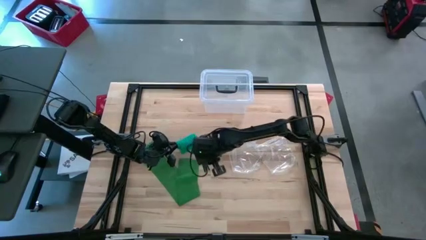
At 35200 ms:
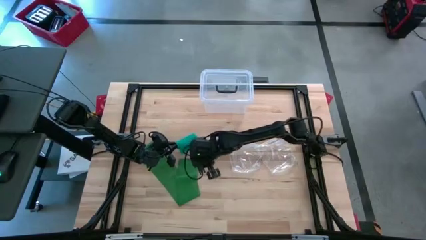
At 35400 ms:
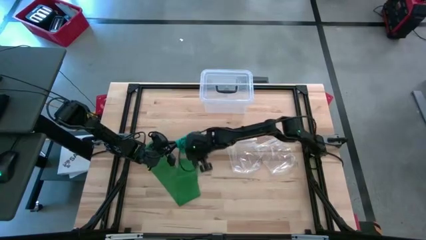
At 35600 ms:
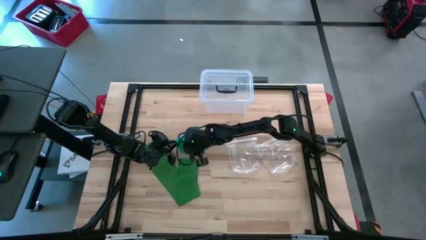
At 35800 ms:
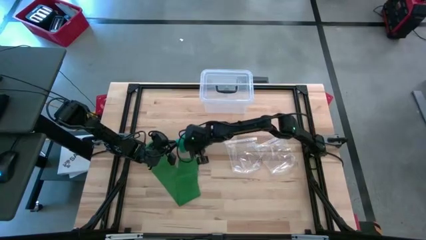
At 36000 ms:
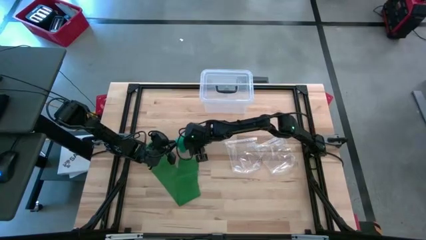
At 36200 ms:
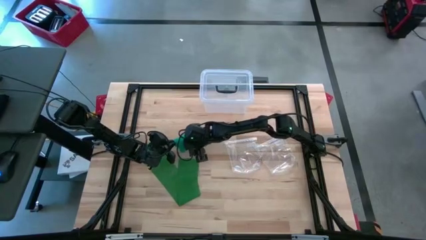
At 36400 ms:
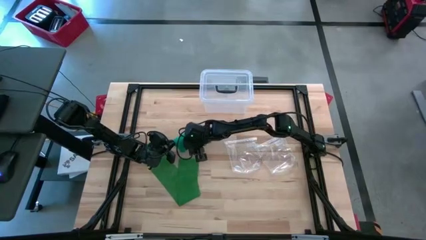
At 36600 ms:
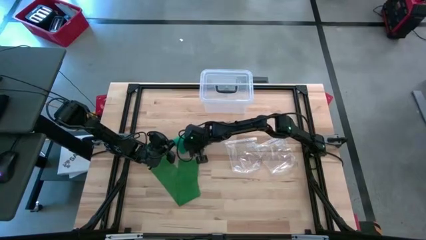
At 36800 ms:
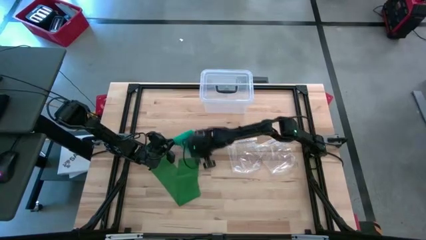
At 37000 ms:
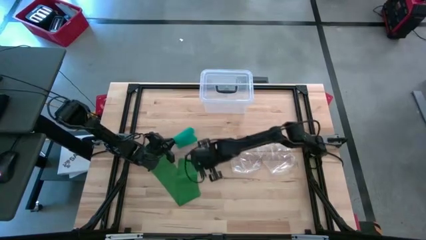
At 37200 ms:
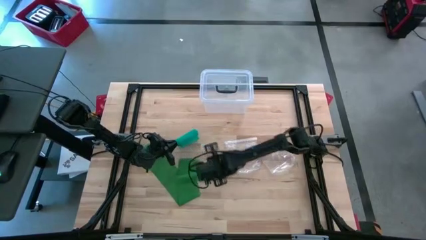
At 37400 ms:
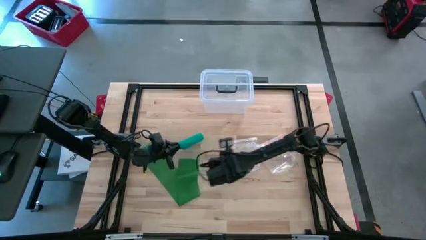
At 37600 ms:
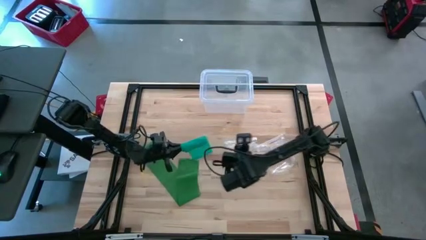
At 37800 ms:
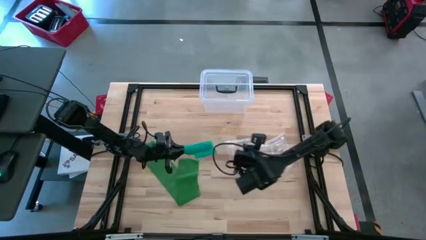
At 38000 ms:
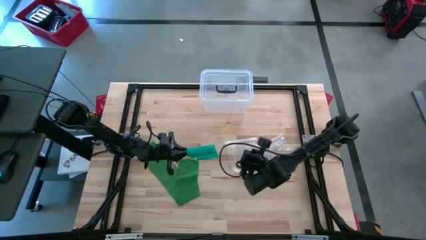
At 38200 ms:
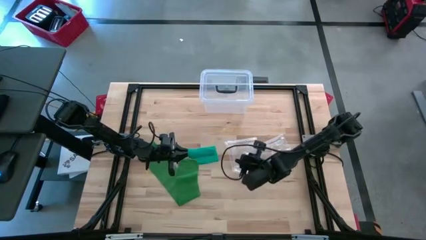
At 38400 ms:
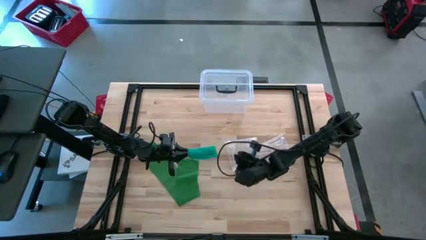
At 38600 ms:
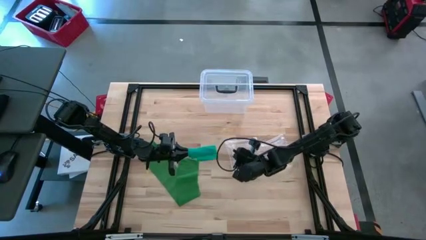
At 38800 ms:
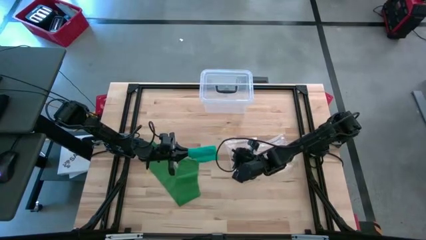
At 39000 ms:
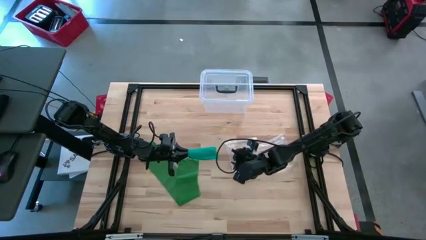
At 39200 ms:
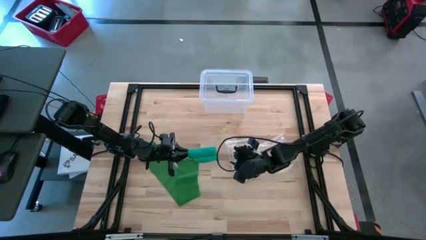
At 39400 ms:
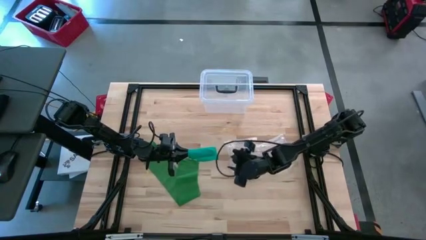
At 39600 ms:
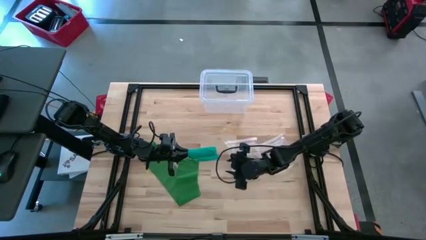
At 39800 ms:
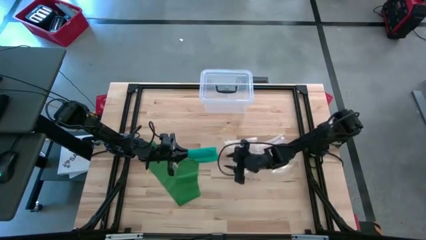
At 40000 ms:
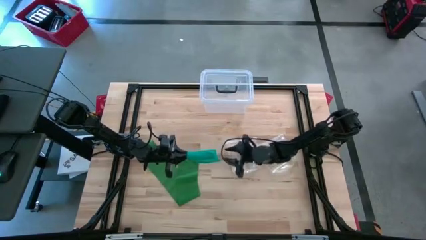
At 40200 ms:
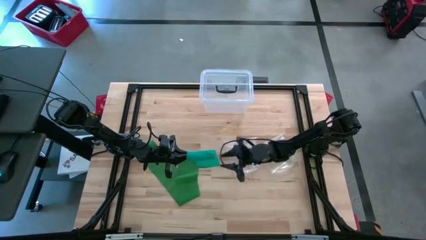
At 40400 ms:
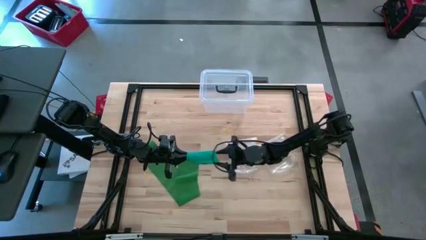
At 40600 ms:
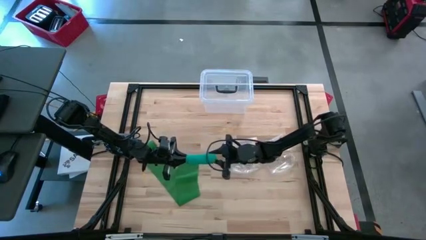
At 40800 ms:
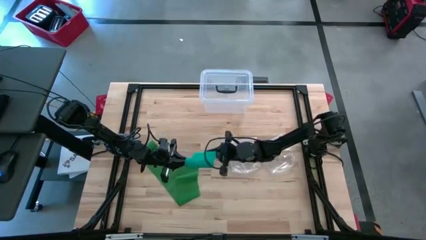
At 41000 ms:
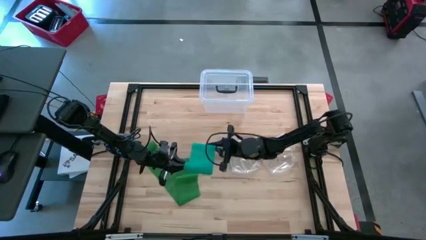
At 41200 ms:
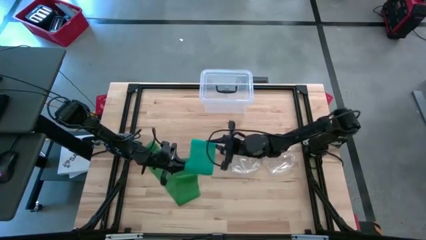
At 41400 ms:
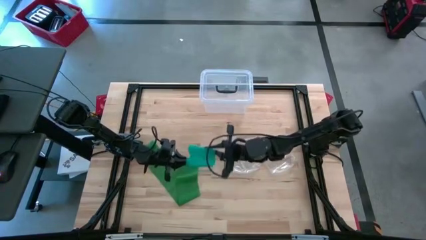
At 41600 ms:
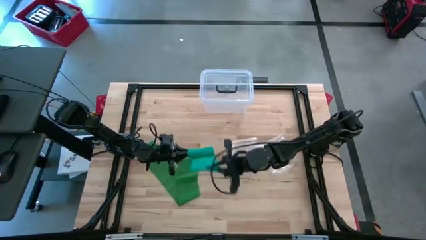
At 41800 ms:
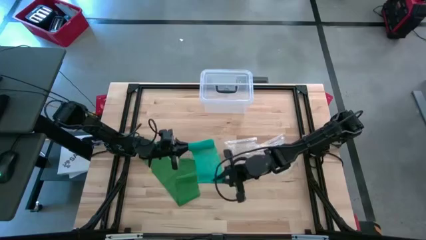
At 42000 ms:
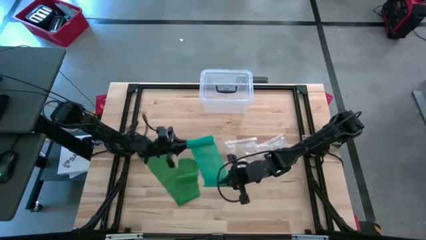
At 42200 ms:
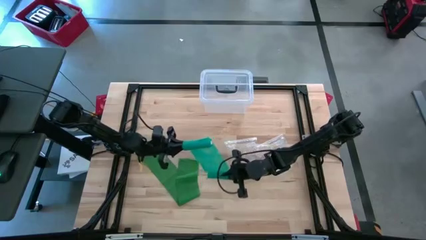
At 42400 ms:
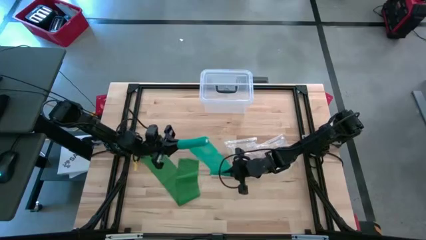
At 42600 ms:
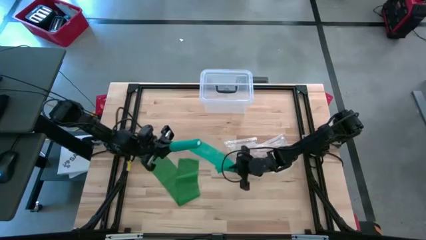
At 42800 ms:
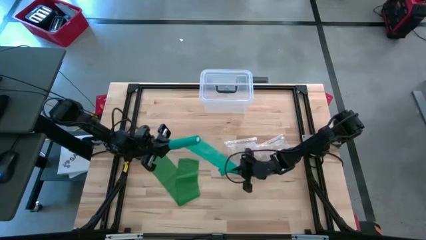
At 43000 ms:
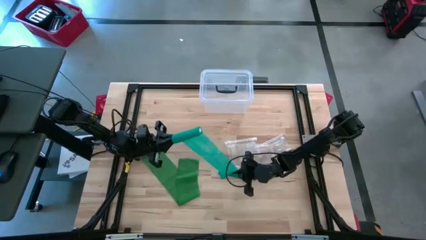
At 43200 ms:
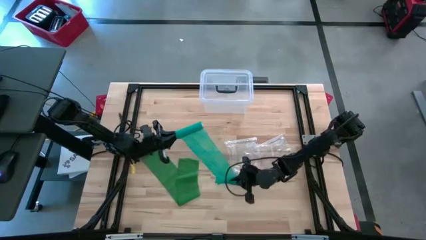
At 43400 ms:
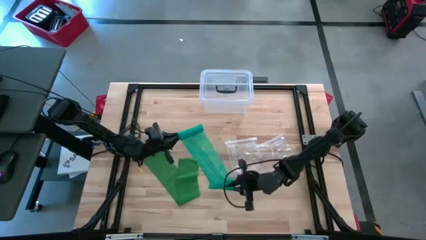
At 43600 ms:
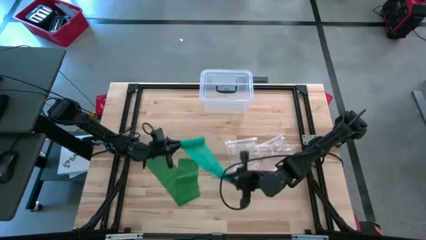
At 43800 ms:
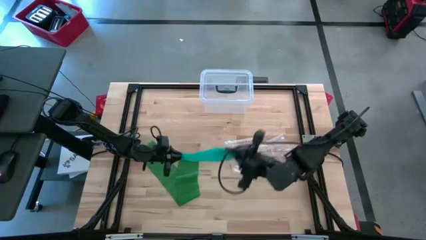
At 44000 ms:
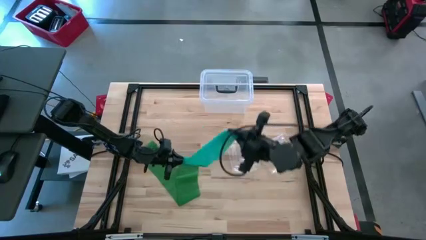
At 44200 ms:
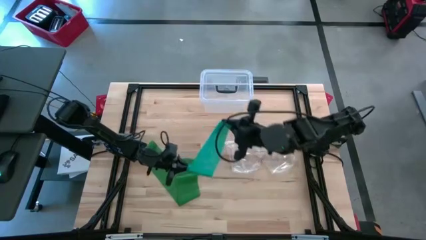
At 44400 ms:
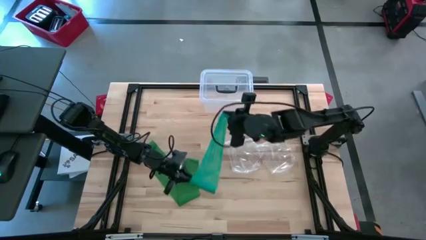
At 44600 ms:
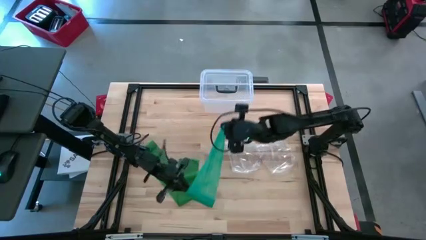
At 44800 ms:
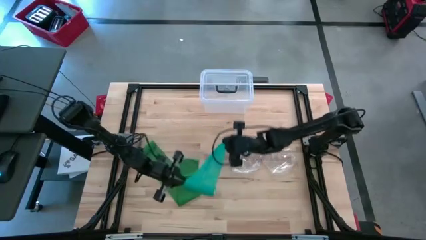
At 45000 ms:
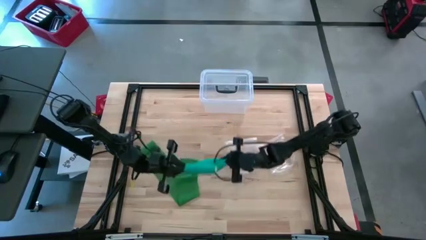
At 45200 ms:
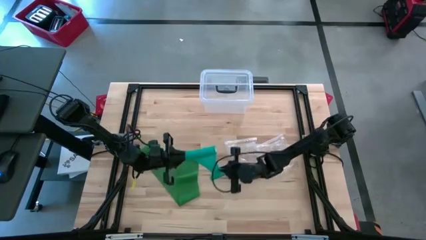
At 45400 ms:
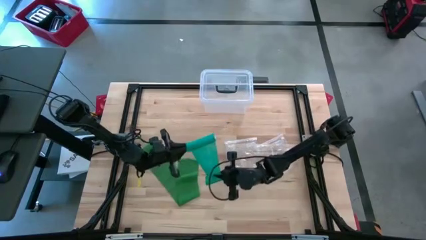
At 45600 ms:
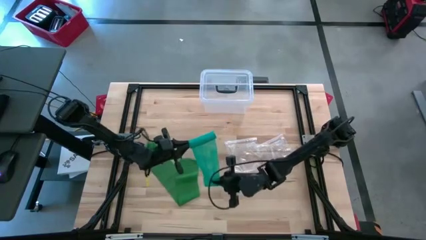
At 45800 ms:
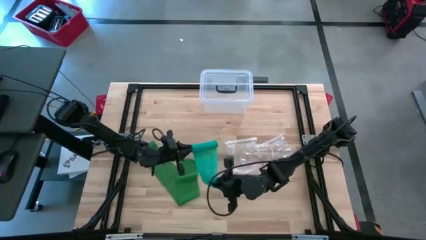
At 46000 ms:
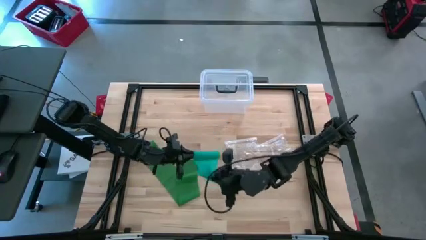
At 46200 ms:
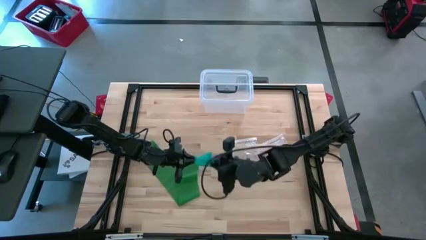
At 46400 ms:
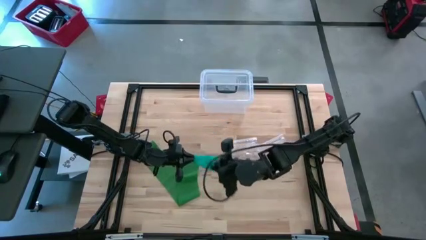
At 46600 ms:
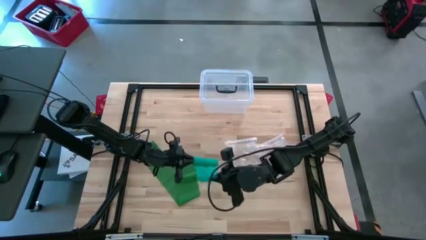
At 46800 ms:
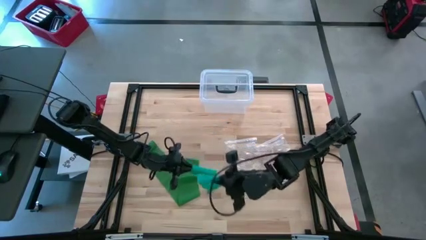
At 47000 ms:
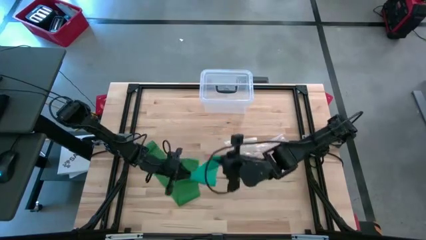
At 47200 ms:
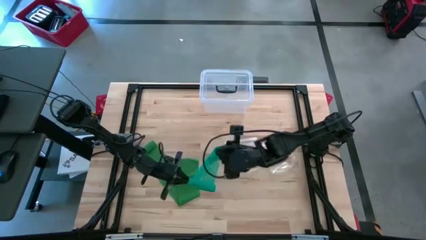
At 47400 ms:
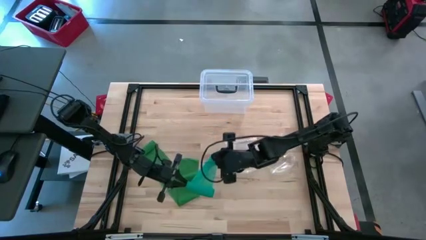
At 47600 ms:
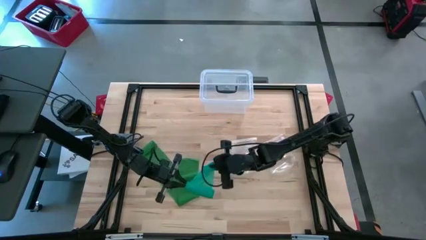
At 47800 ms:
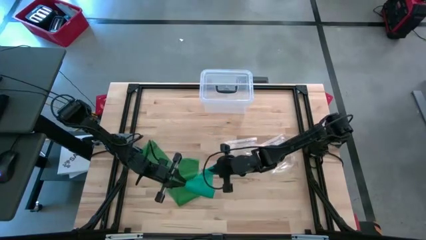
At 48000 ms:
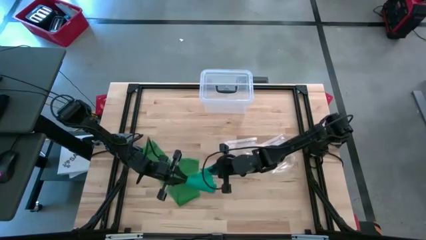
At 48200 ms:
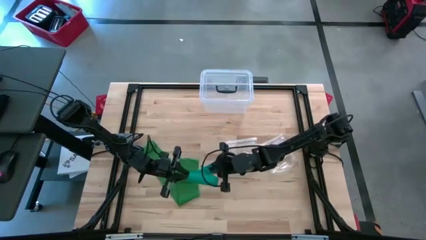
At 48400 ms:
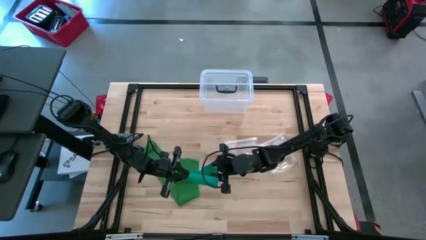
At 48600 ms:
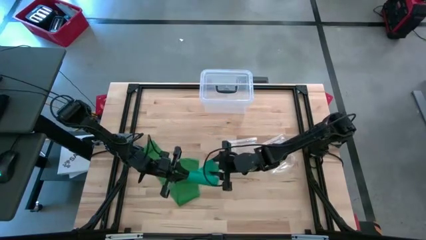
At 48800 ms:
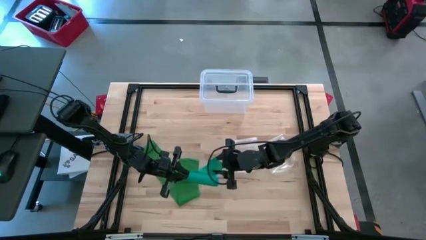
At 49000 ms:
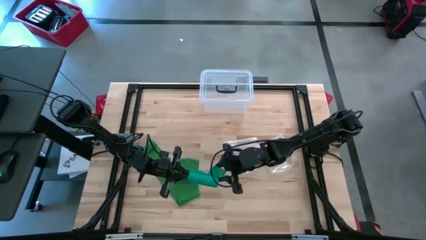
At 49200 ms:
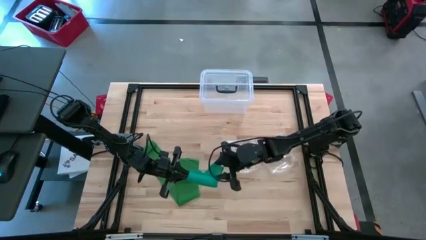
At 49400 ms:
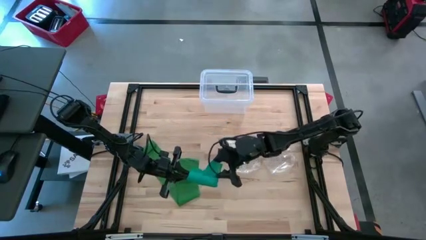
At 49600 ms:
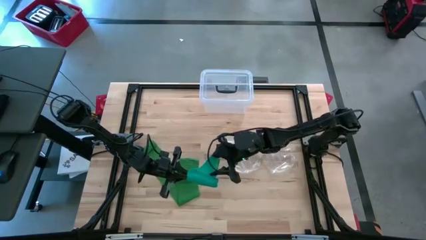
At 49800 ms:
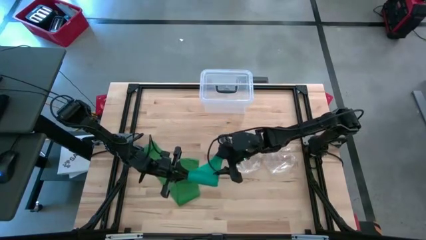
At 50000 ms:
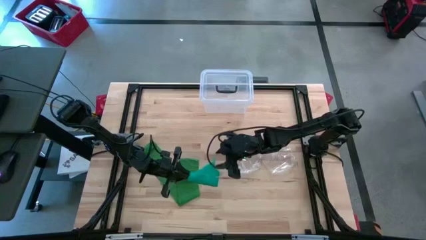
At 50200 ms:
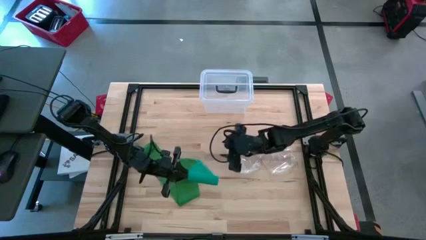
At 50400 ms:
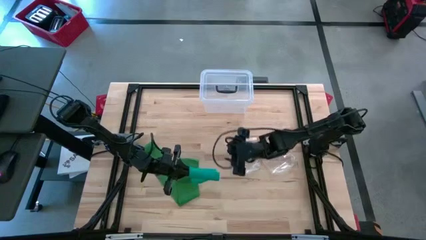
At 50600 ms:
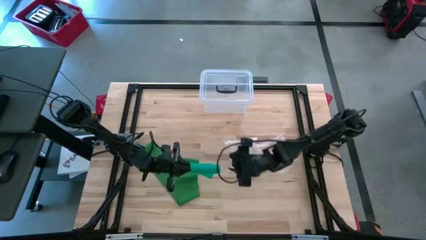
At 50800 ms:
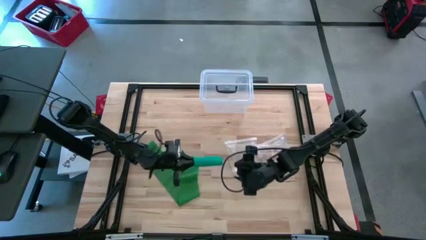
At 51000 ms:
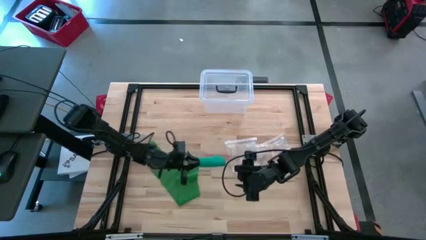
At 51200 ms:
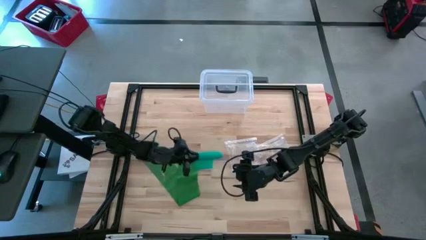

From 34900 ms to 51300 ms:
Task: Roll bandage
Roll the blue bandage
